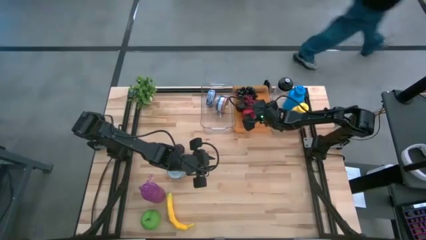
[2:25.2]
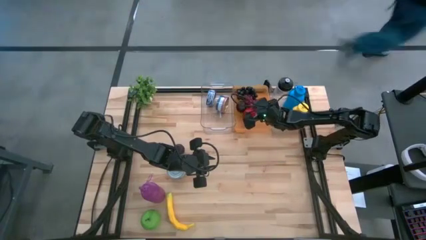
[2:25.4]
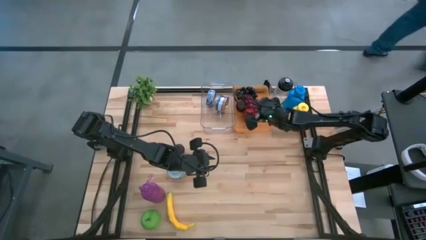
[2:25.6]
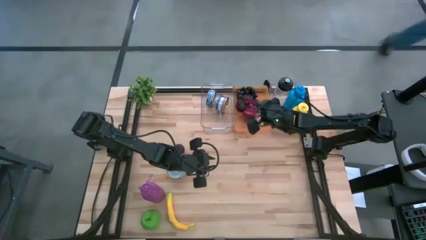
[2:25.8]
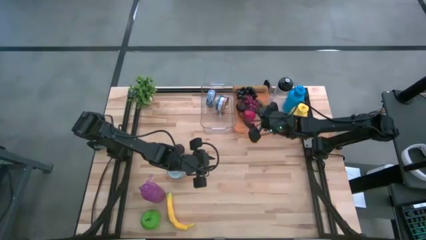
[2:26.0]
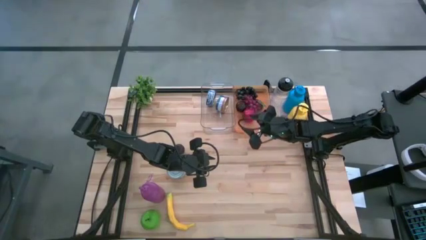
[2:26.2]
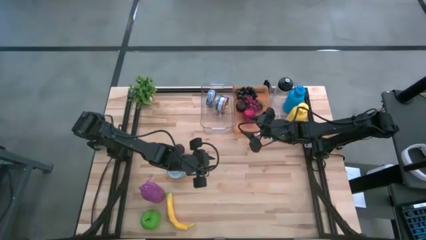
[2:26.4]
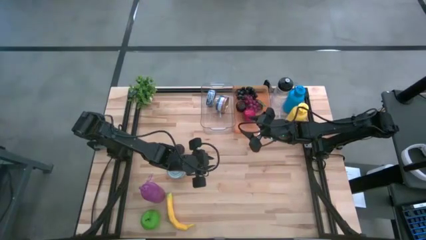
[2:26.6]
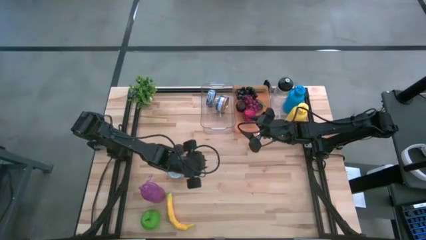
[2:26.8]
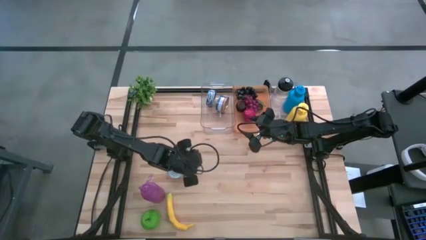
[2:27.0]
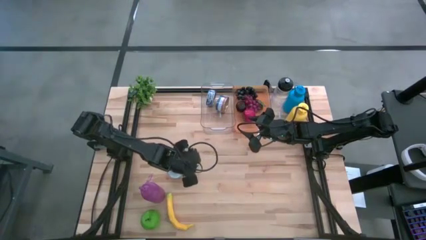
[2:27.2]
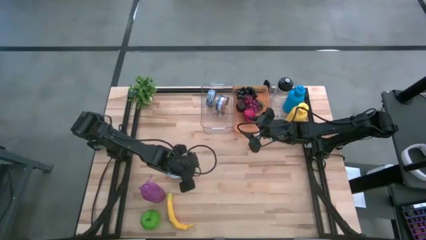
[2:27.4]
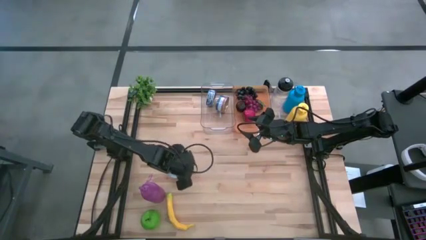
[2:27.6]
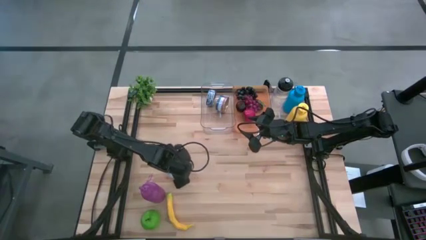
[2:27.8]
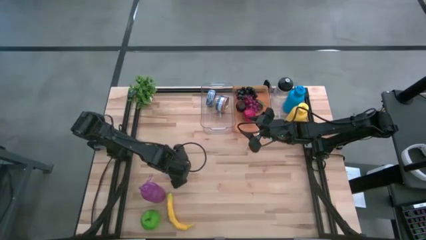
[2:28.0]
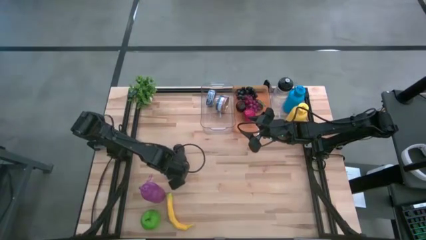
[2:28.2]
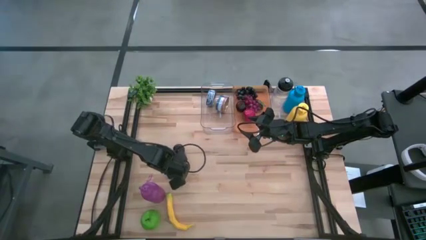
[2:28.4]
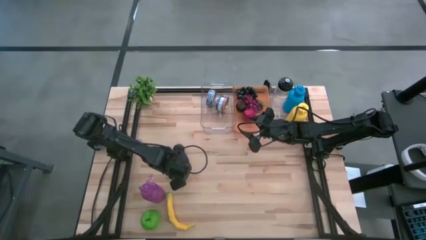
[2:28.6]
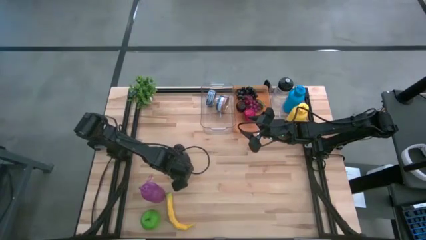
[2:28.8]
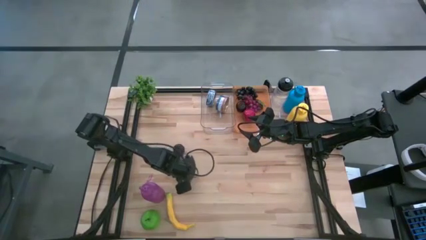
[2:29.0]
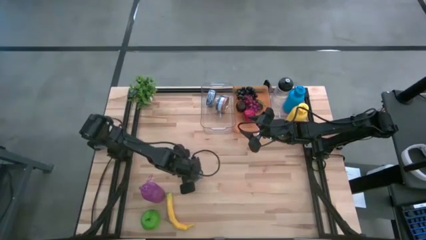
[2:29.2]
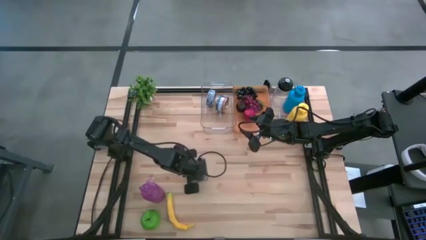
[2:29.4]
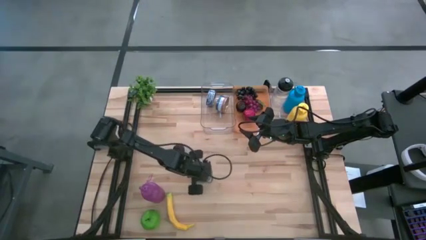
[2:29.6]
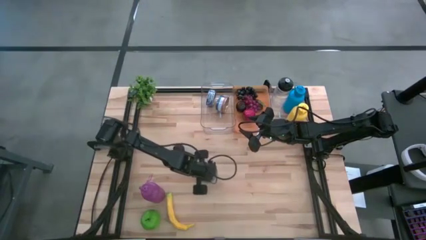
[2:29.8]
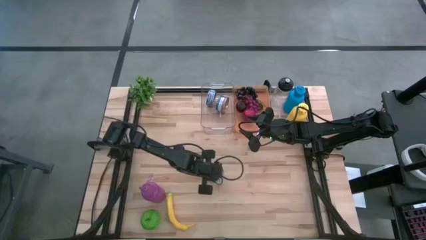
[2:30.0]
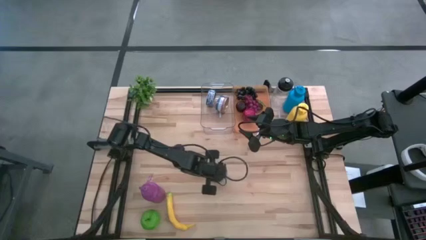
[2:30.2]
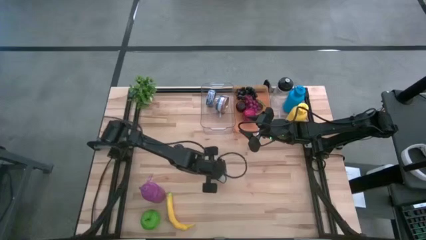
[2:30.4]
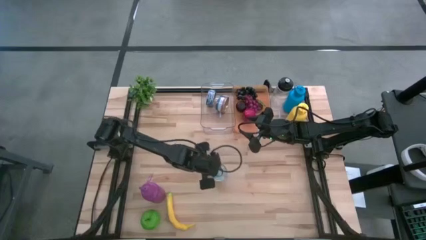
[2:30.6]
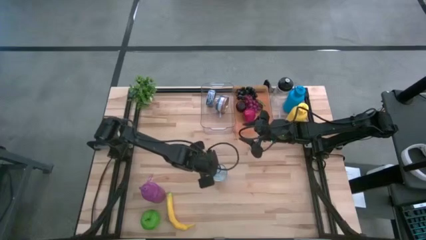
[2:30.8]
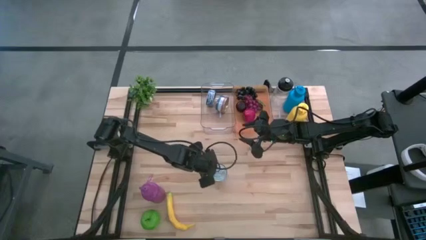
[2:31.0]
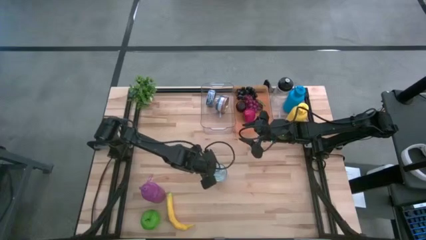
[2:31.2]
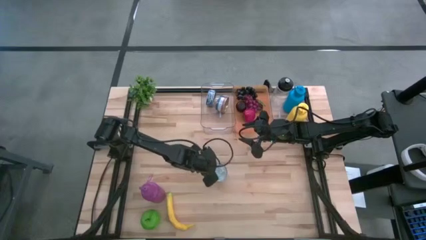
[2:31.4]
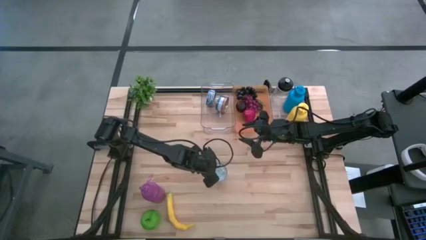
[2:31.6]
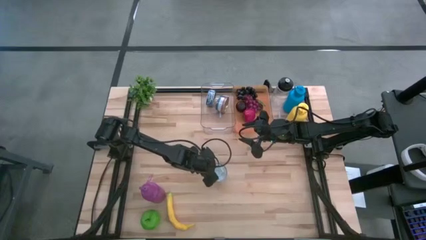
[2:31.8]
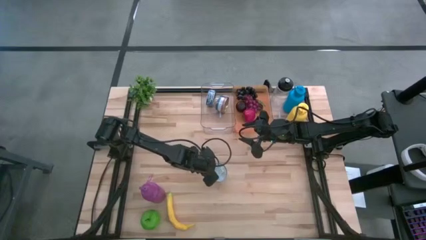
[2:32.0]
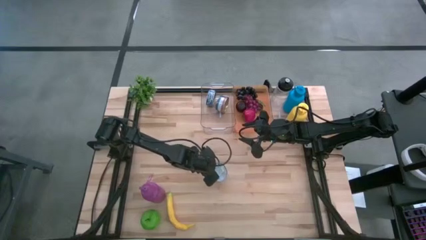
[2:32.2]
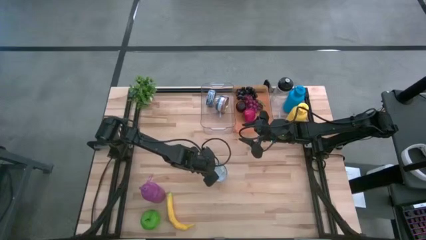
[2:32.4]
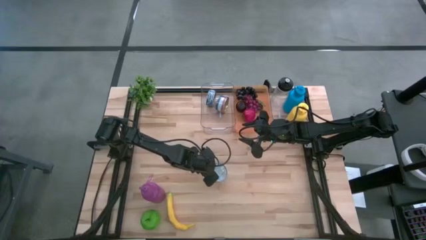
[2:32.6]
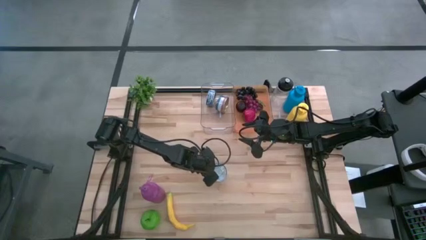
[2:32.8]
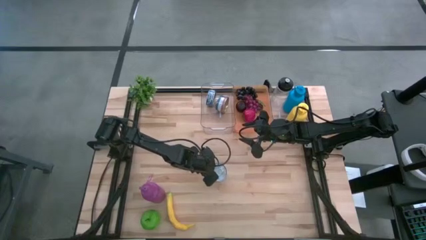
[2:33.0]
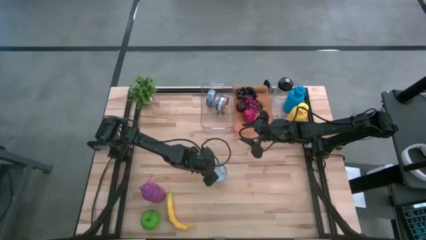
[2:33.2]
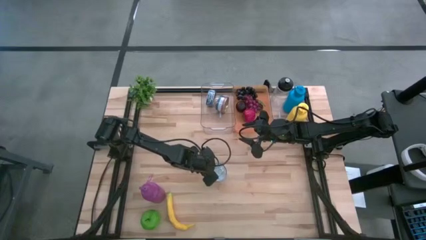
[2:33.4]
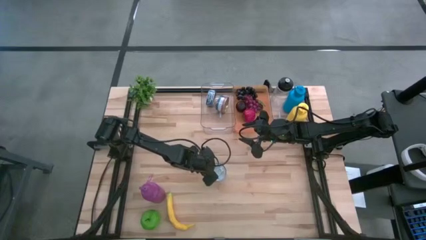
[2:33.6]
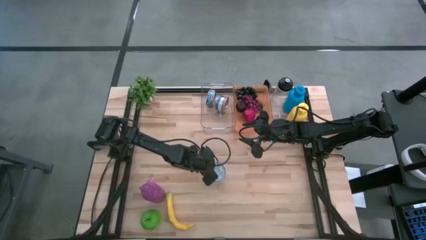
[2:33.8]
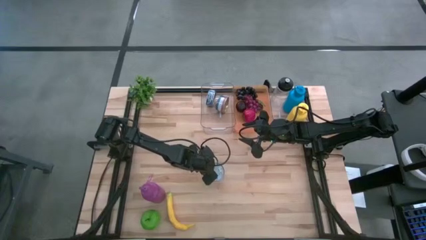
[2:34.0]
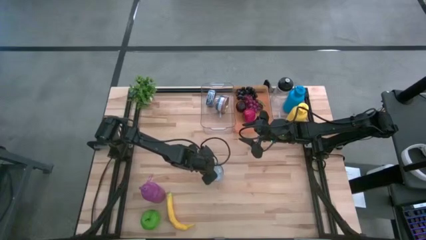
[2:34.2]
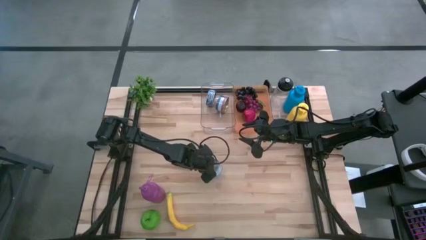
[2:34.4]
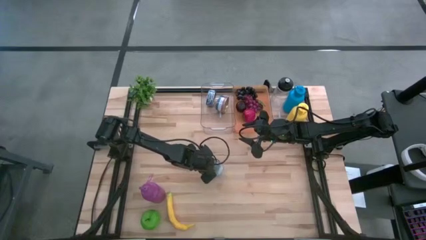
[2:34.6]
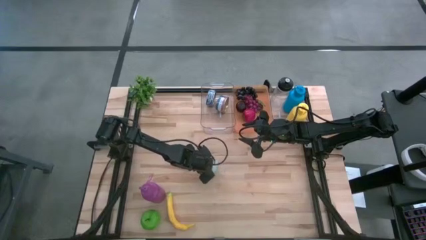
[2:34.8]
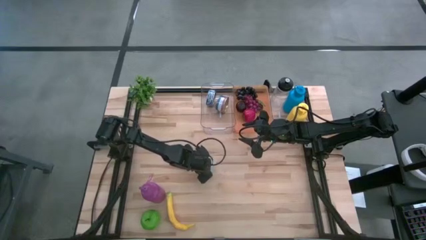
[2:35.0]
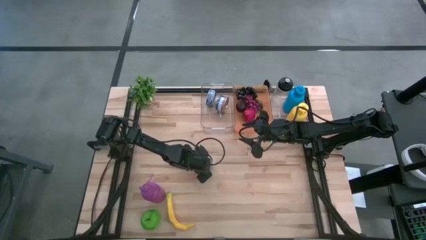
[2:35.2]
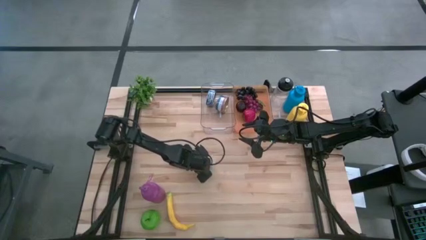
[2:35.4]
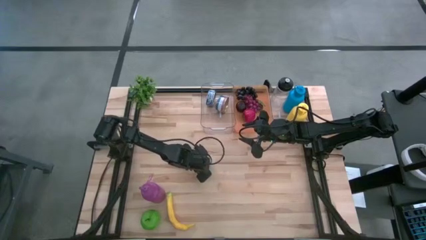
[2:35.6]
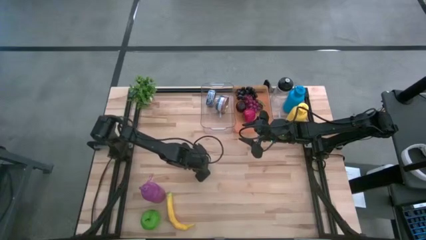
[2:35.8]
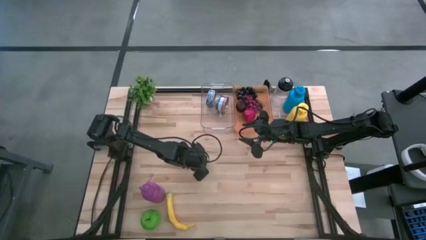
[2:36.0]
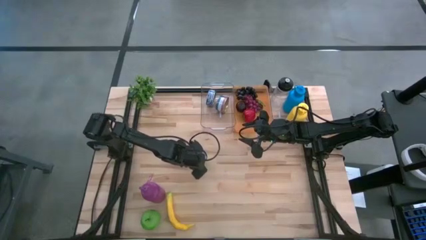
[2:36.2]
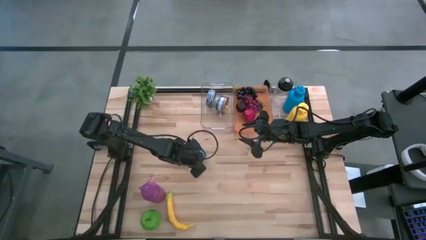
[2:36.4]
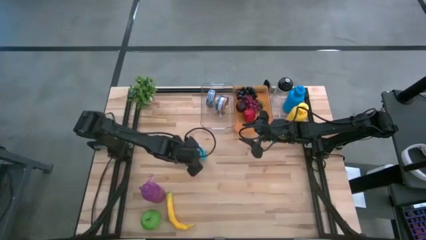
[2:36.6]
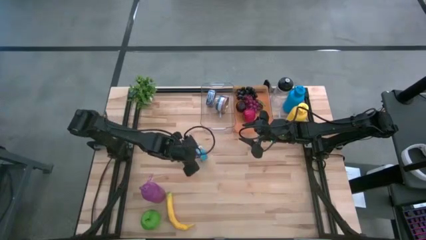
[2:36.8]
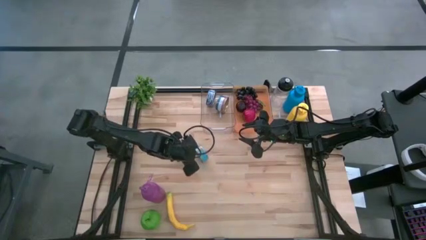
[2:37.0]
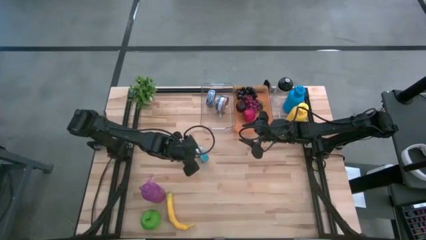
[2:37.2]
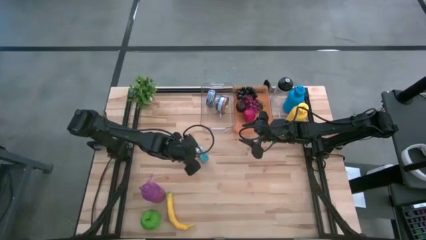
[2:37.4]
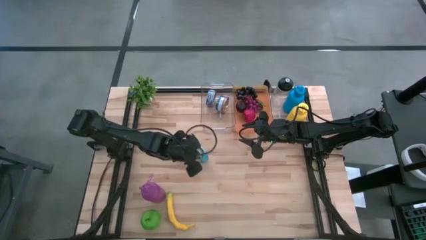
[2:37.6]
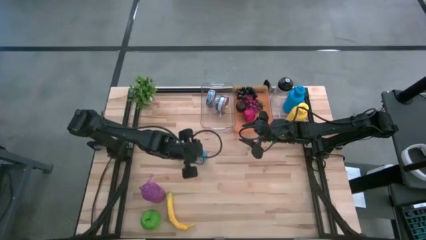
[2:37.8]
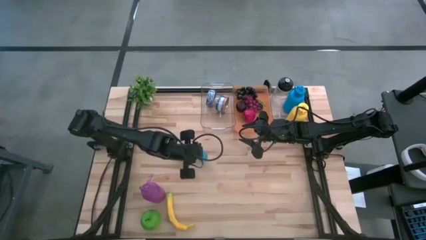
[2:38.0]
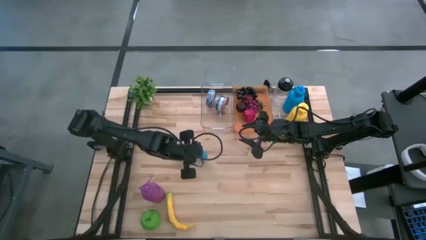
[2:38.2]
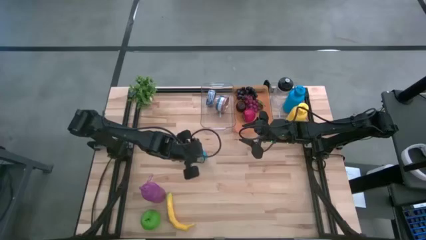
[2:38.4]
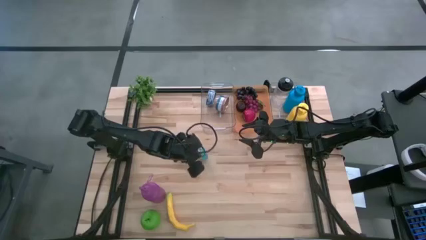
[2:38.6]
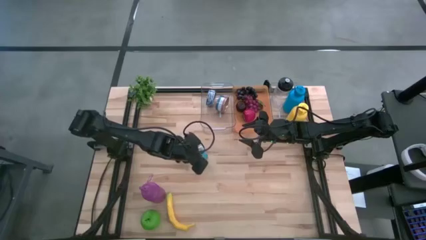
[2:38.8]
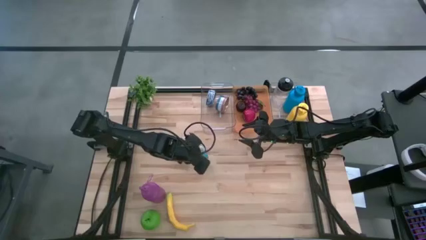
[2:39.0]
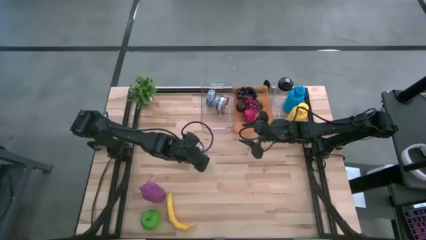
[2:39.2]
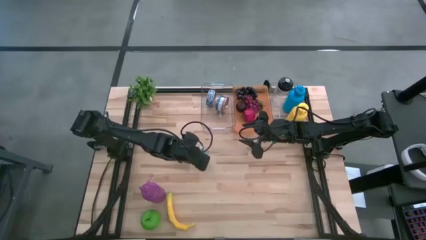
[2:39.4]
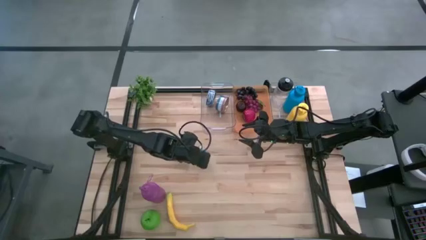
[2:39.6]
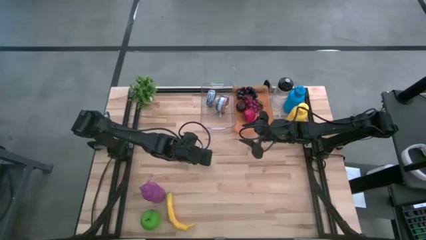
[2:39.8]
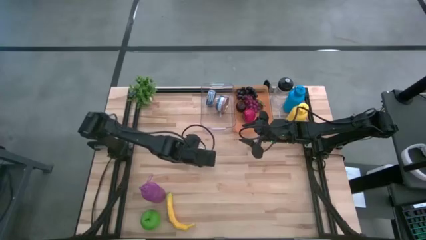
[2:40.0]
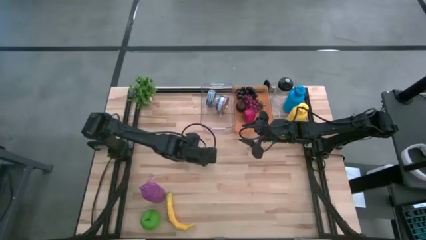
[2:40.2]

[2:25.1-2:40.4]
Task: Pick & Place Food Item
Put the yellow and blue tuna can into the left transparent bin
